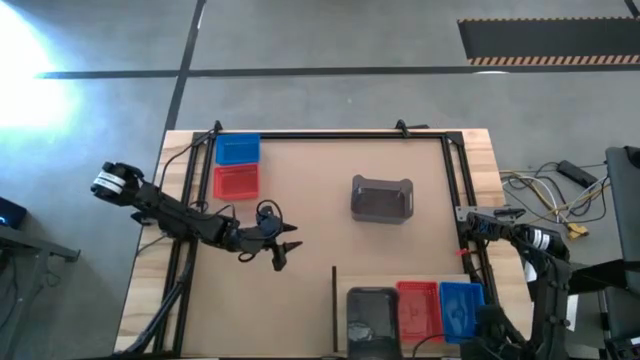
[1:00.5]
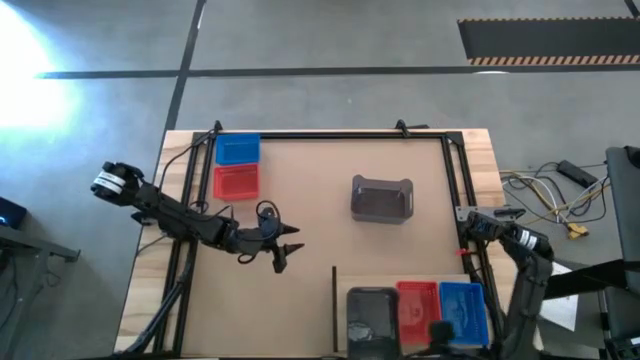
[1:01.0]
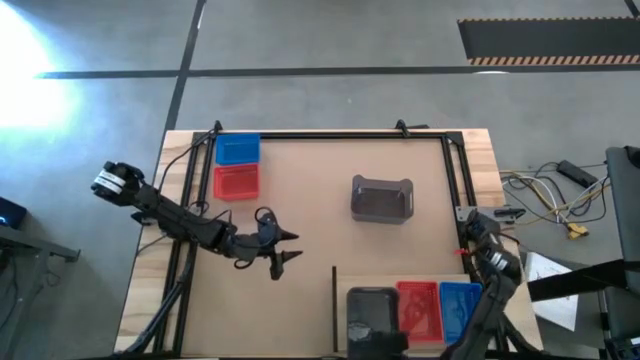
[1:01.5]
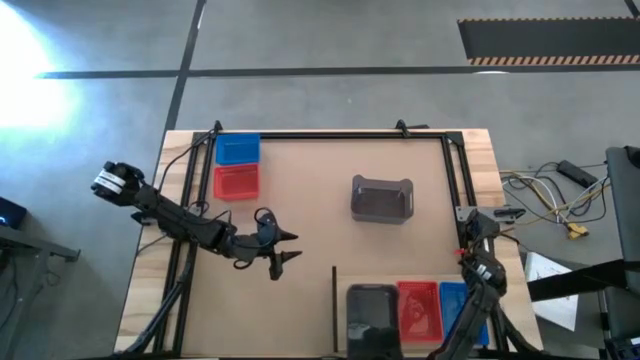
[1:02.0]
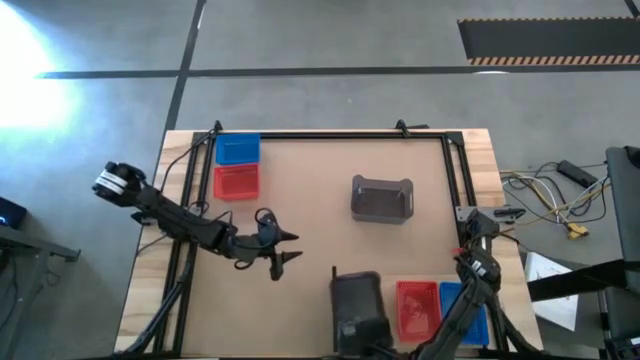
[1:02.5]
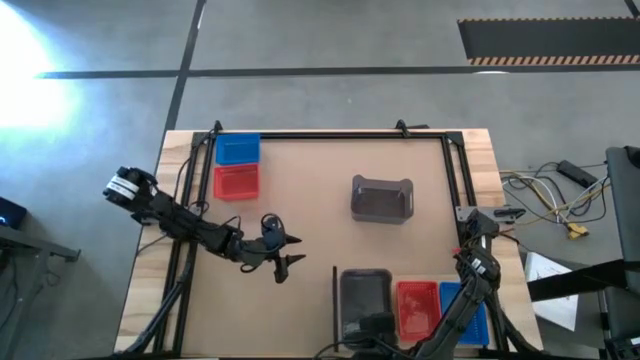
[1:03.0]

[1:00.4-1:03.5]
Task: Stack baskets on shelf by color
Adjust the stacked black bins on the shelf

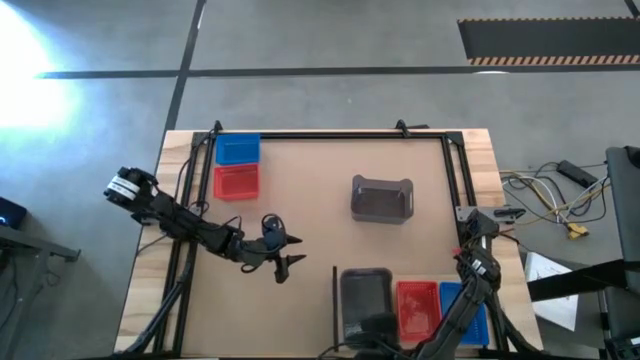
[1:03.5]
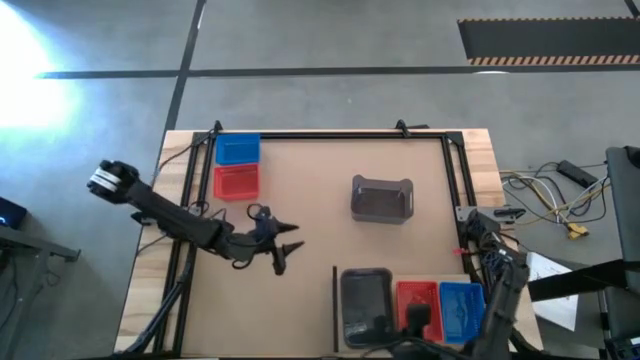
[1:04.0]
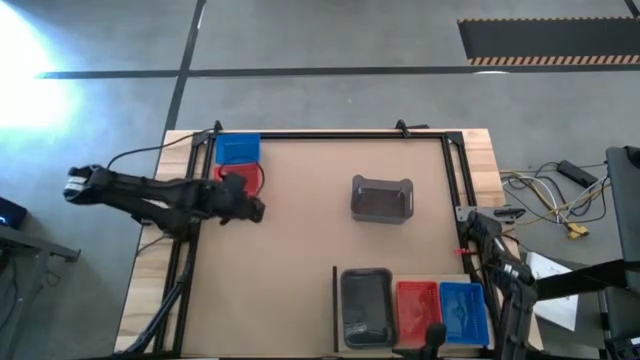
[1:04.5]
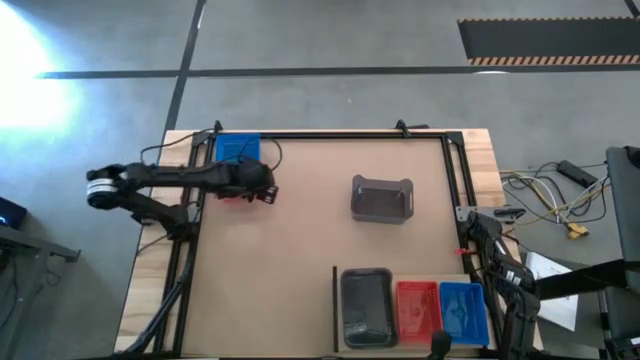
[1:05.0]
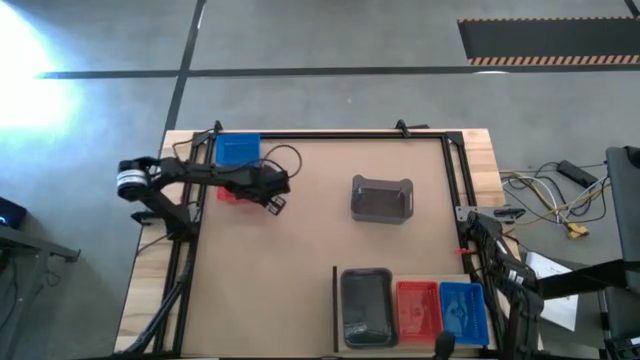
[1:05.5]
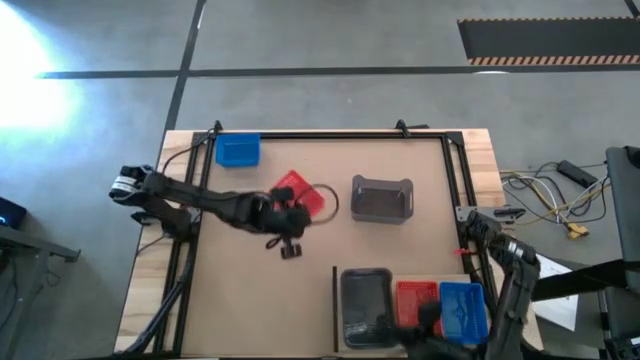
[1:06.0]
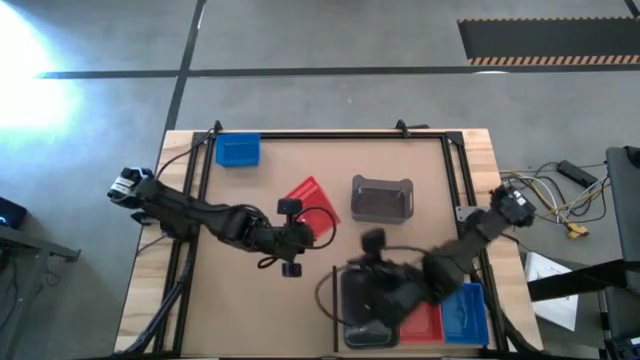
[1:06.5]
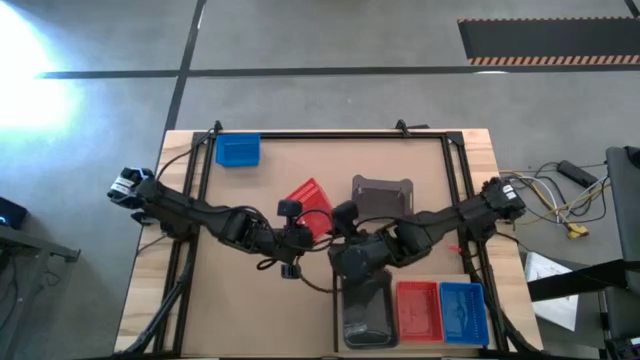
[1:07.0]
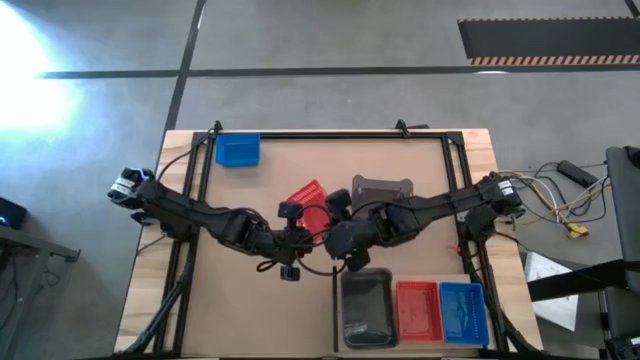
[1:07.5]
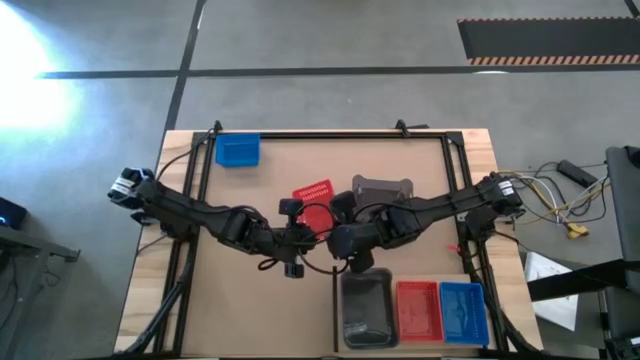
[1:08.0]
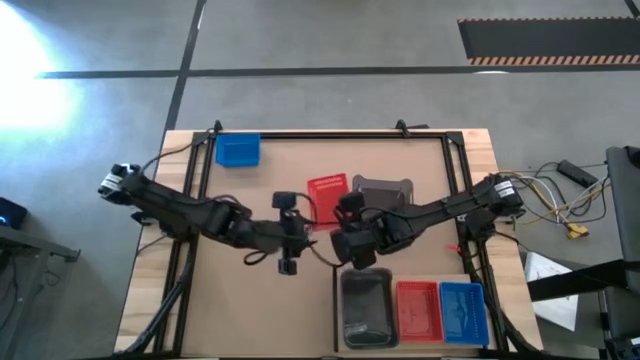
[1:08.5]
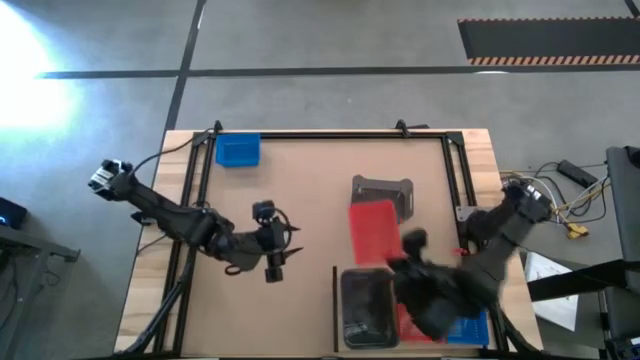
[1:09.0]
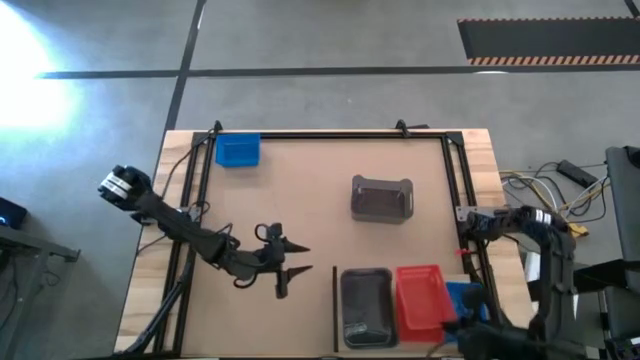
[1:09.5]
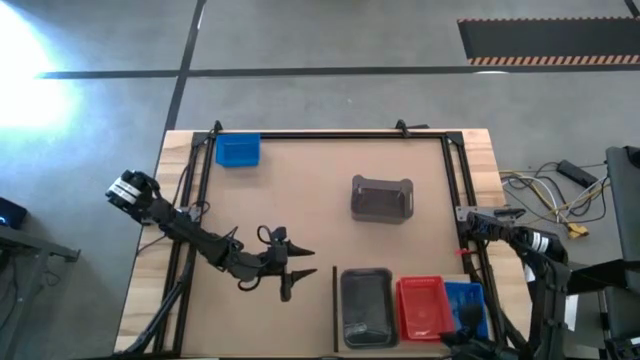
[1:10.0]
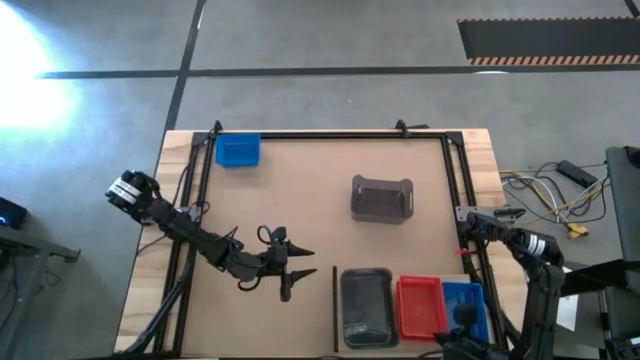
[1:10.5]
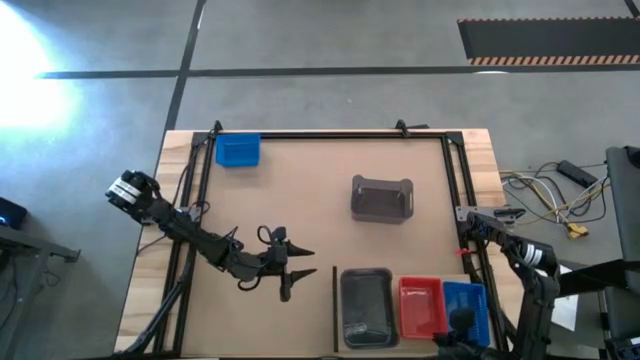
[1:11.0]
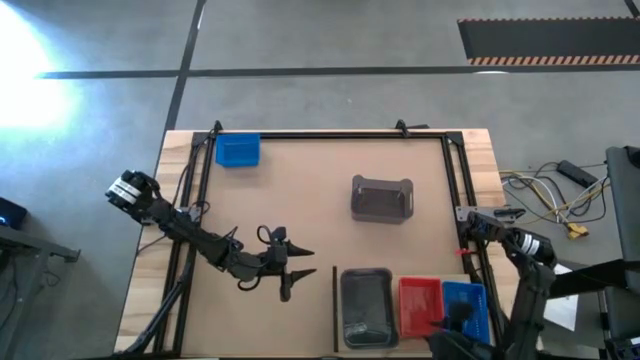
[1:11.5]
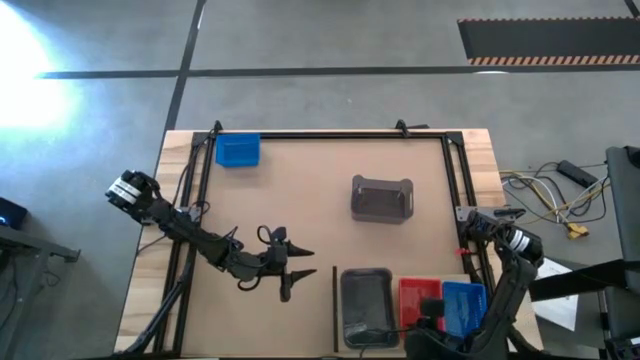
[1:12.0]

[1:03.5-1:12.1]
Stack the red bin on top of the red bin on the shelf

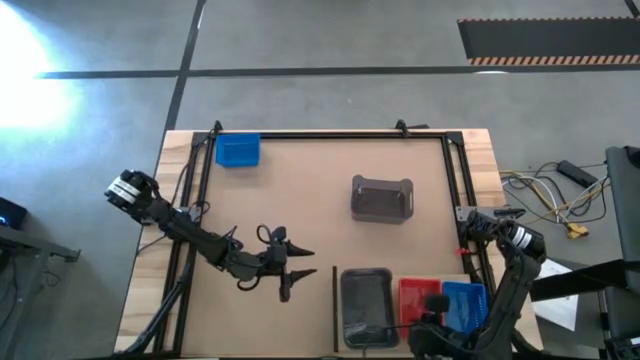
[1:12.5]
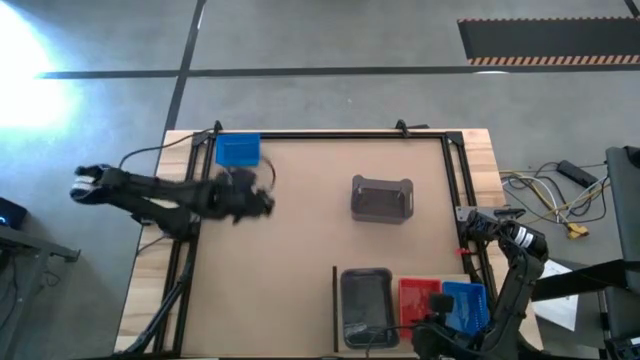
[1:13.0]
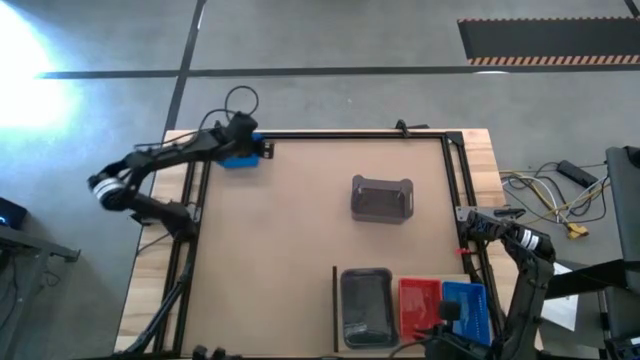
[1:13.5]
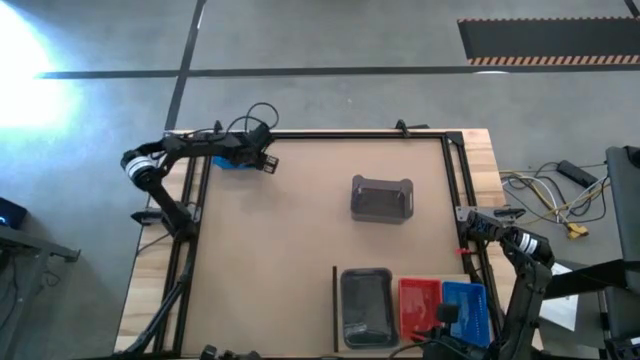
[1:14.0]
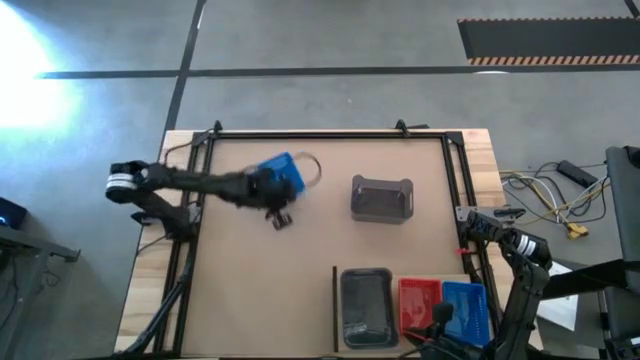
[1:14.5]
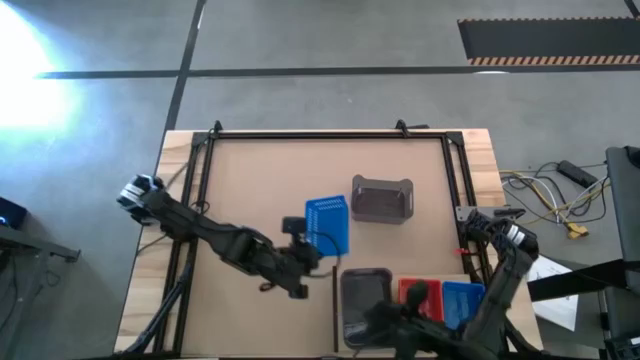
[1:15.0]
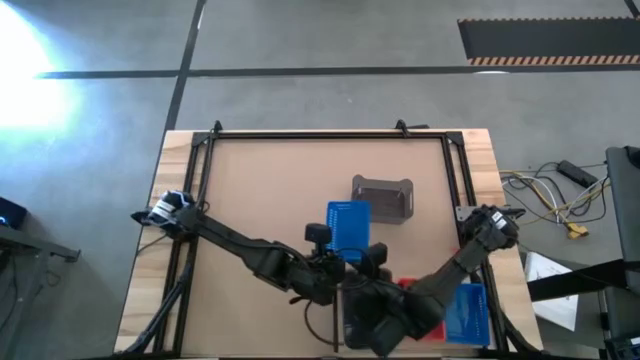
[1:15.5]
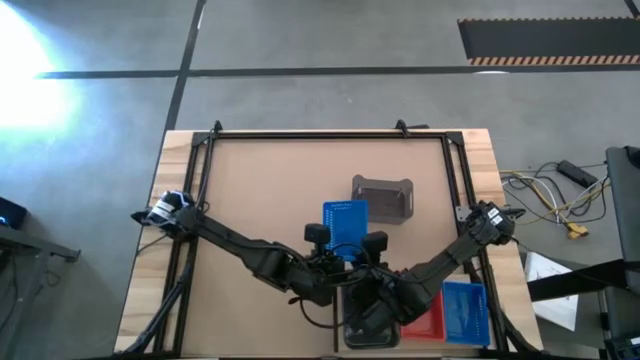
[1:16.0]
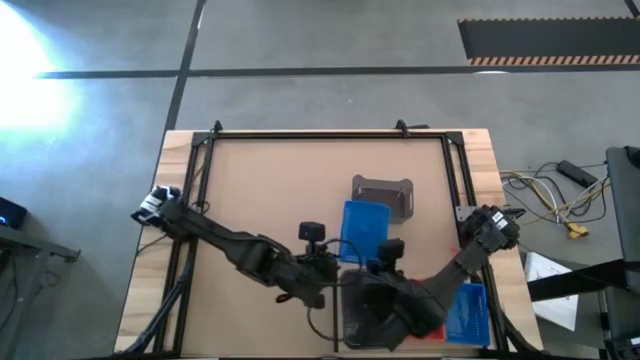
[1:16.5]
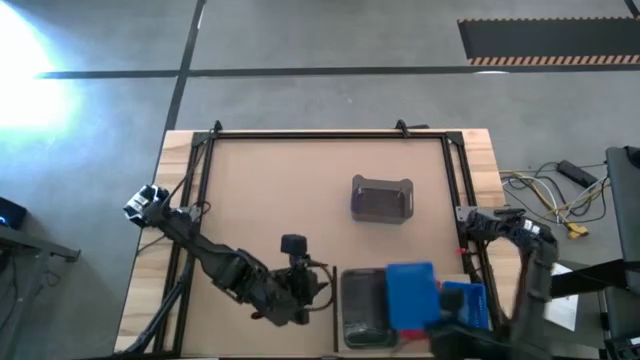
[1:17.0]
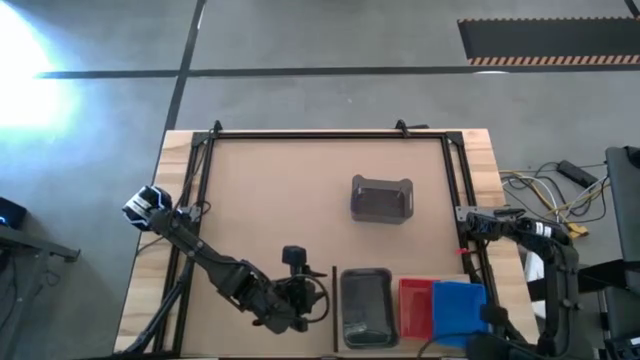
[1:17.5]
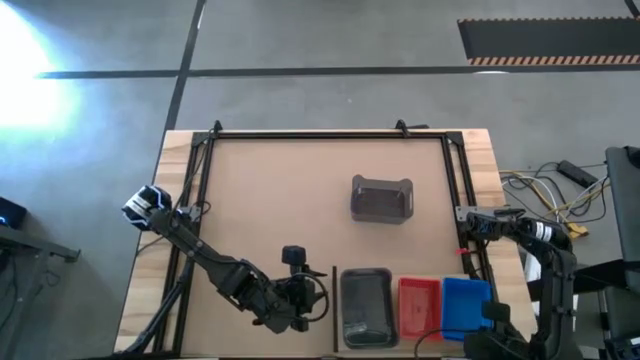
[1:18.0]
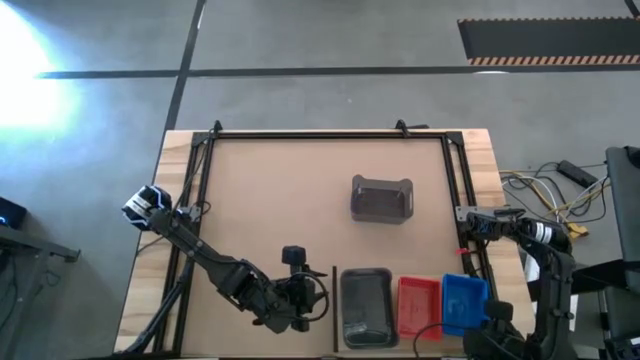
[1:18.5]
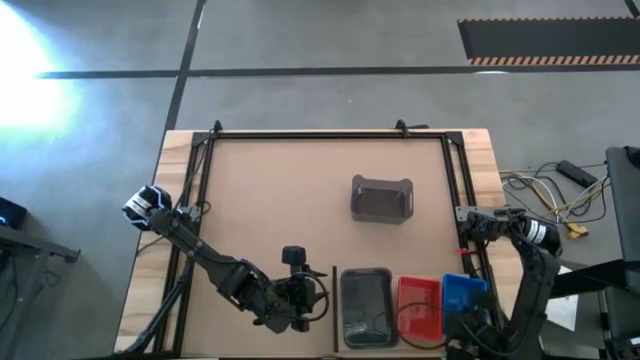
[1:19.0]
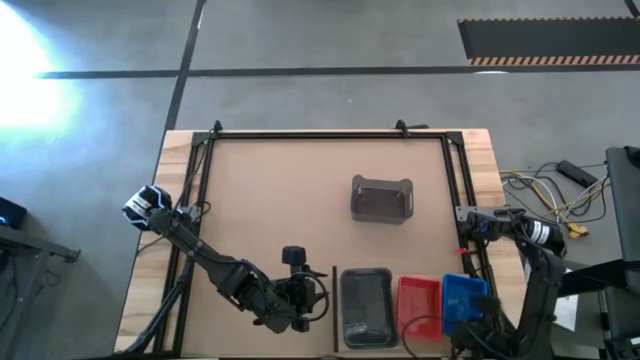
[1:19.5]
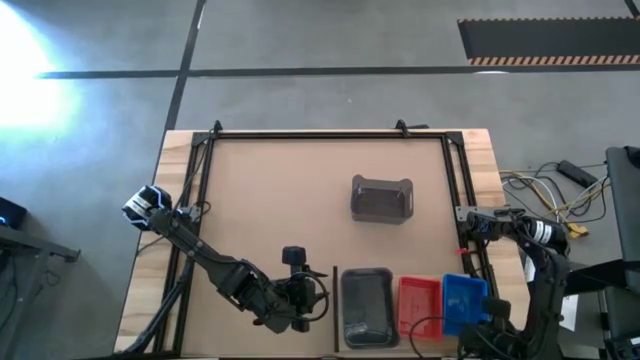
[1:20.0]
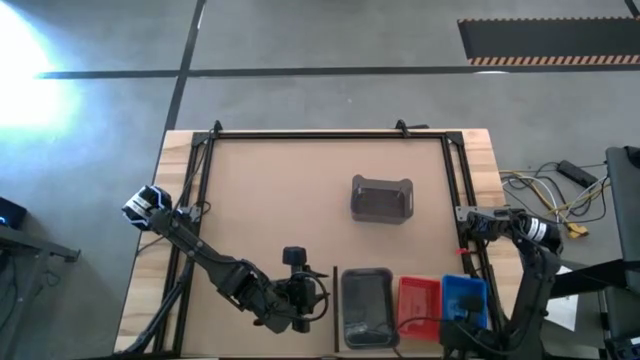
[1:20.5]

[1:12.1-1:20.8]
Stack the blue bin on top of the blue bin on the shelf

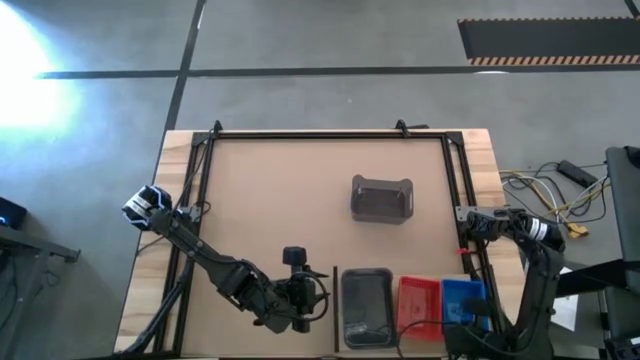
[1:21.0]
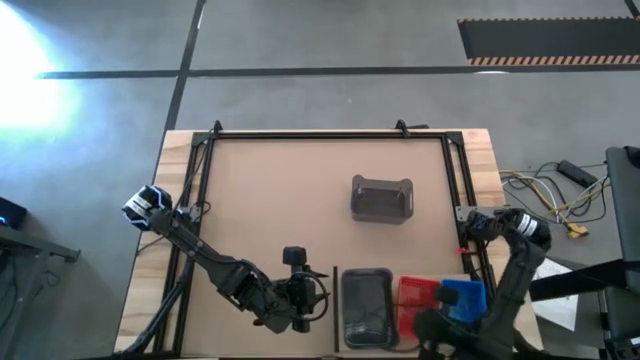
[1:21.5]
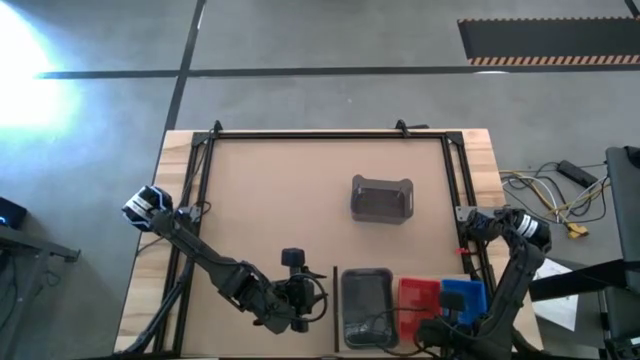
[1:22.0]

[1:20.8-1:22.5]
Adjust the stacked red bins on the shelf
